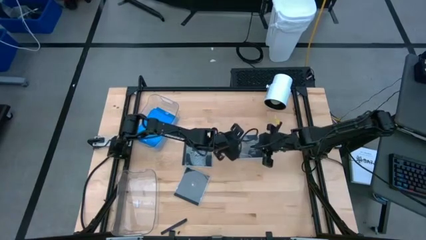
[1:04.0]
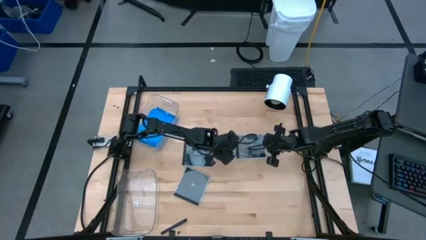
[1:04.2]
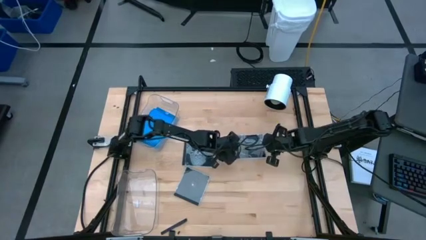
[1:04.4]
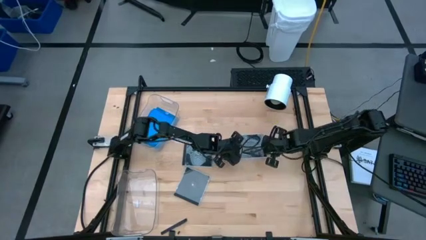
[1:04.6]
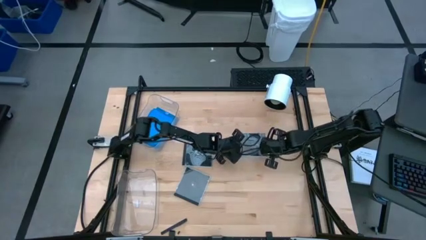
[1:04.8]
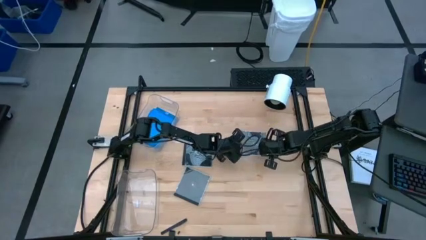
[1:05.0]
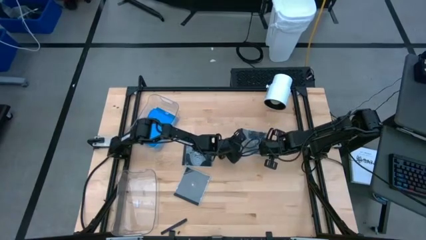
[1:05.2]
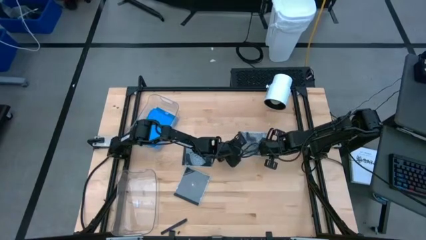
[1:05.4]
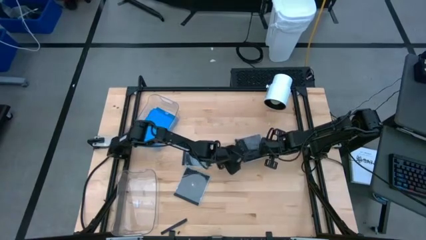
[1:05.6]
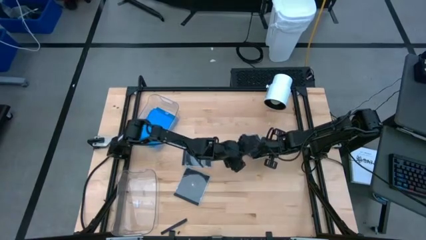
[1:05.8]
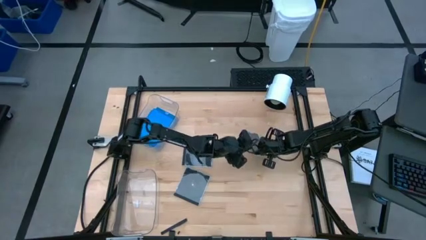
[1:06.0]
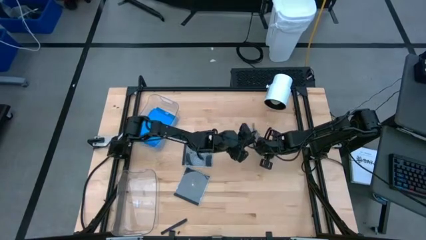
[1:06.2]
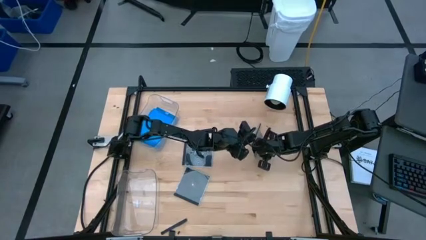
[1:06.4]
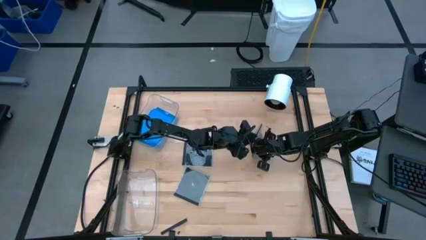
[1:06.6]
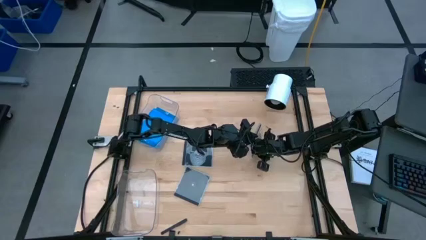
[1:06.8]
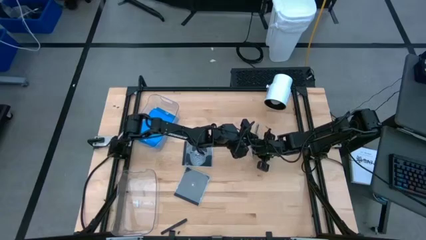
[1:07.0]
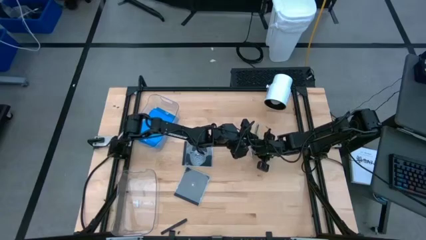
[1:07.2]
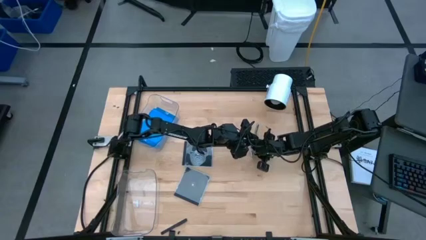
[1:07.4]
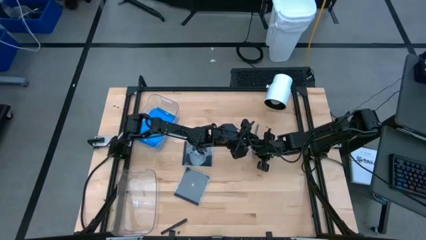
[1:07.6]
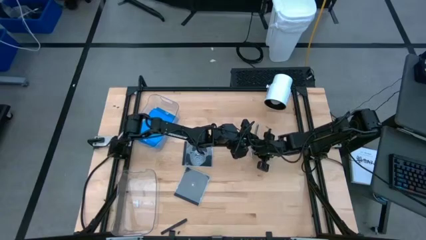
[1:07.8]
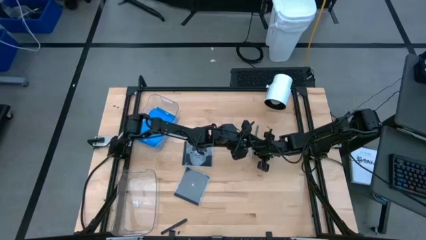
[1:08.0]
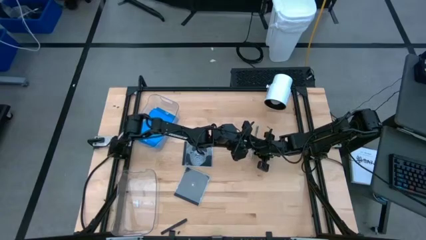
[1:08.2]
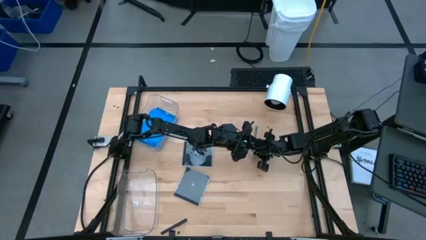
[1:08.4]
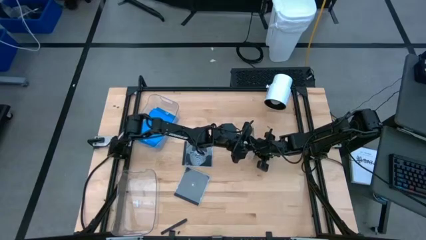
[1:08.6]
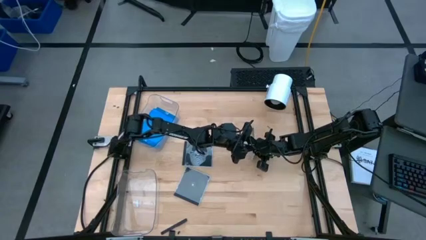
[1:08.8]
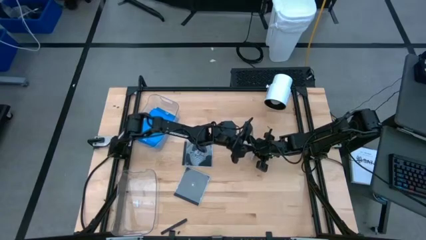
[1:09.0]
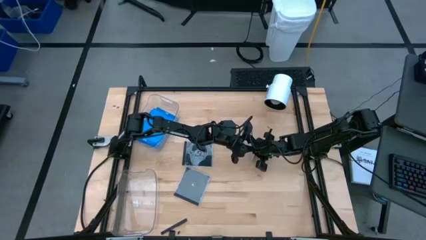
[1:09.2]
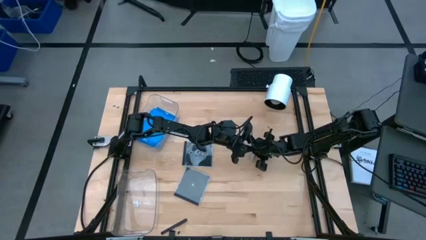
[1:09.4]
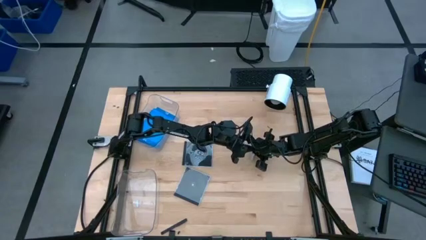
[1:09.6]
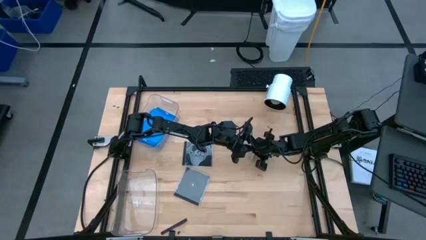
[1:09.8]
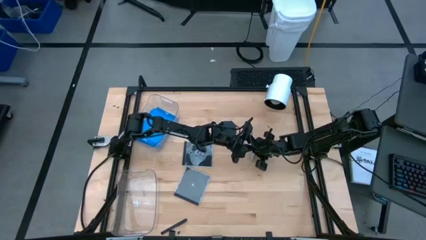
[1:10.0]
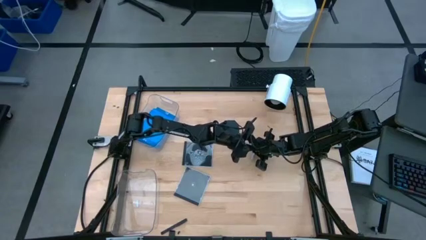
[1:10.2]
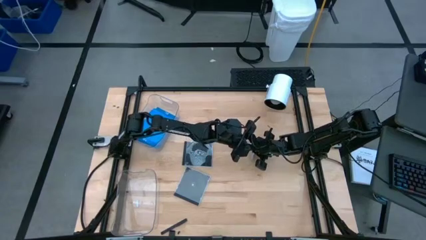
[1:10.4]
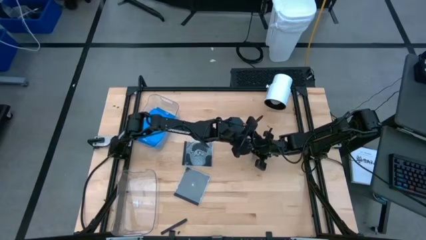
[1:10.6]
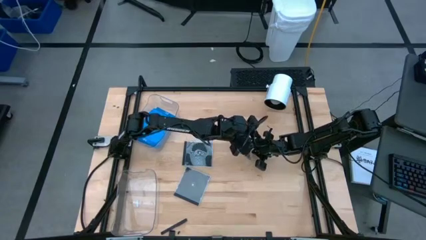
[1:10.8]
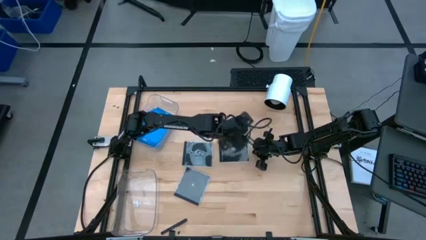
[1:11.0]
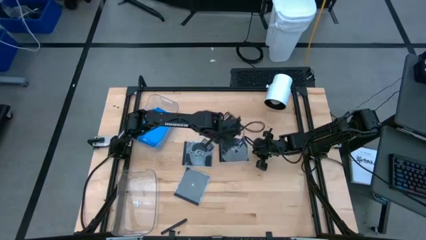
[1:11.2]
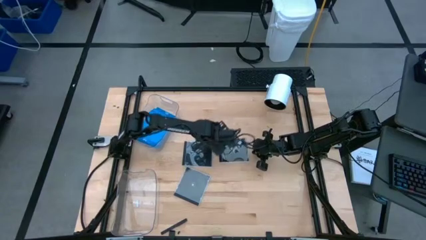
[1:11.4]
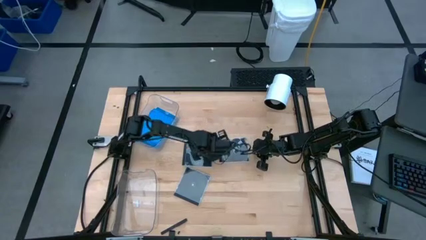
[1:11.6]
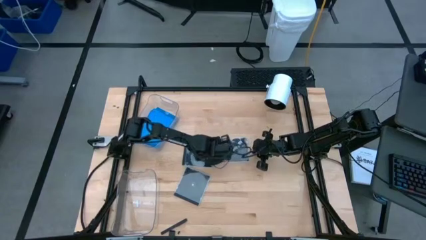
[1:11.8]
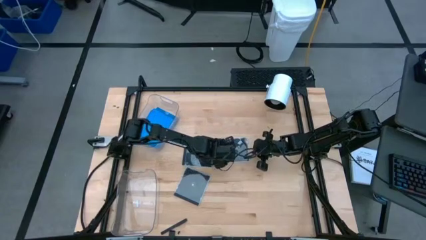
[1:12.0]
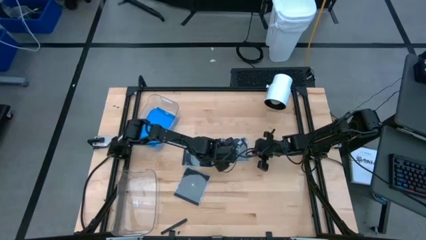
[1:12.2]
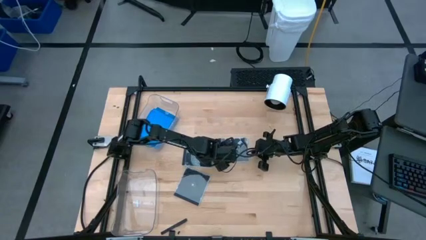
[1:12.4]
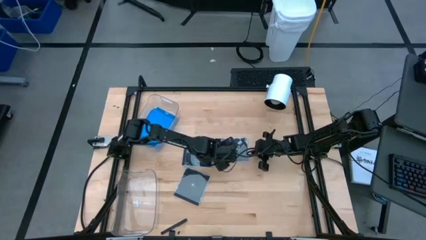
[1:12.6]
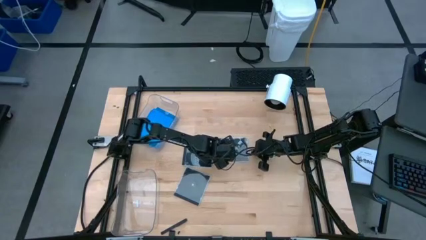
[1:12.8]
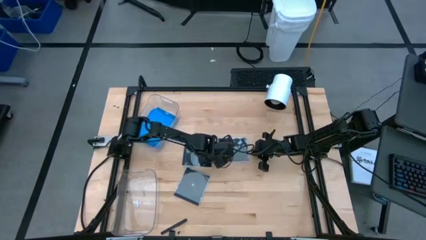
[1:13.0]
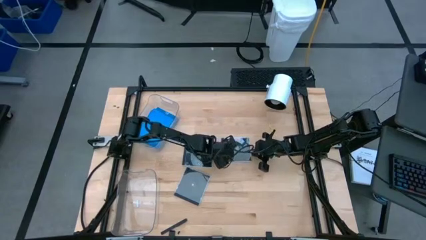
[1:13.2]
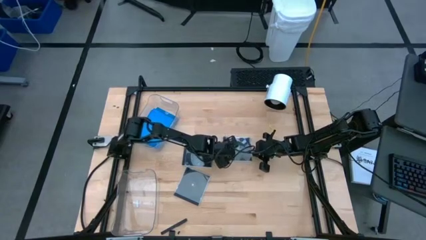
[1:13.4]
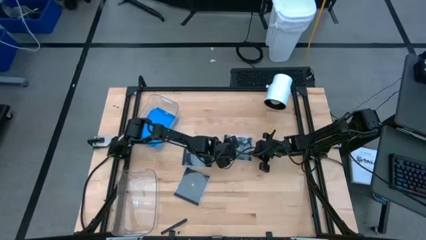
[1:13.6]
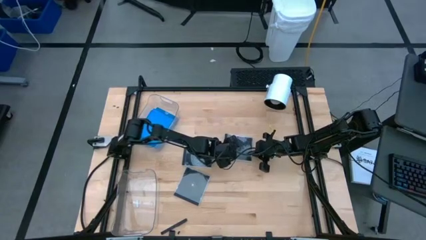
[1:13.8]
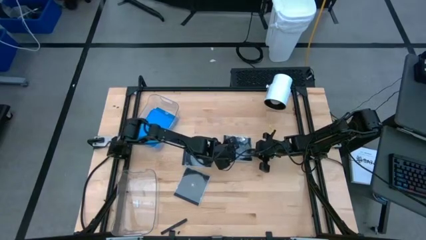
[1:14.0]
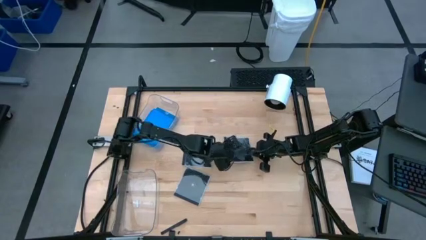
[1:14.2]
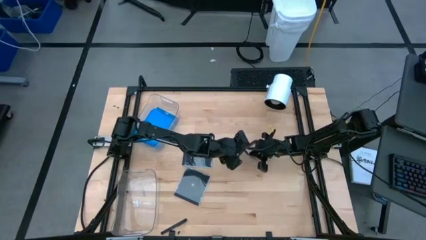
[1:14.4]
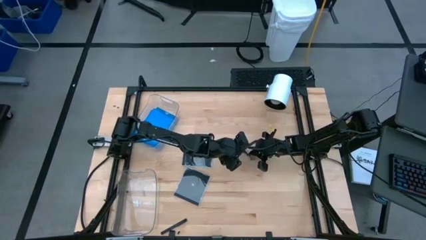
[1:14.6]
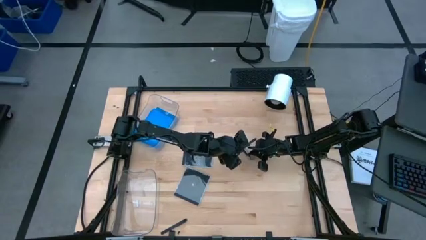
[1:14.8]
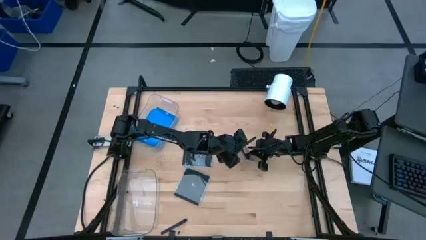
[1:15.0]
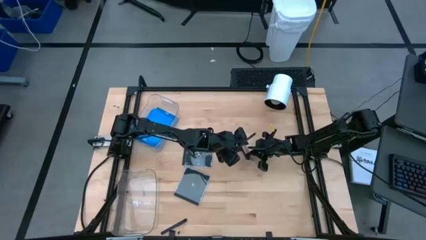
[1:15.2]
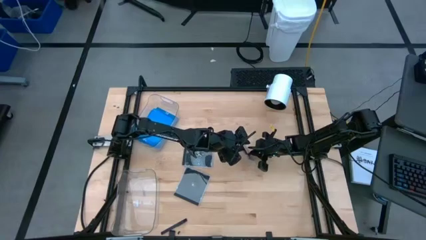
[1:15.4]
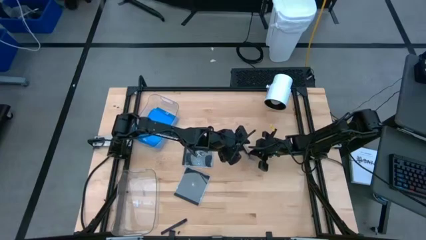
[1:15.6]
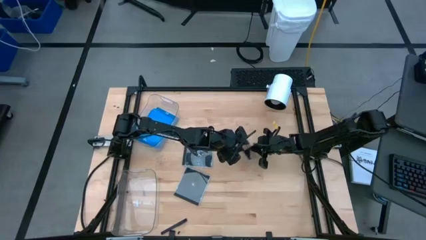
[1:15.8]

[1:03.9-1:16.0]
Task: Pick & place jewel cases by type
Put the top black CD case into the bottom transparent bin
